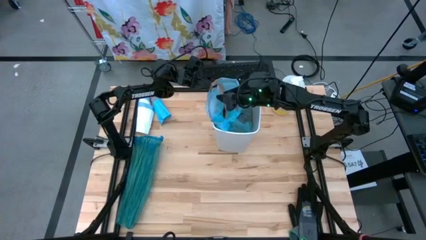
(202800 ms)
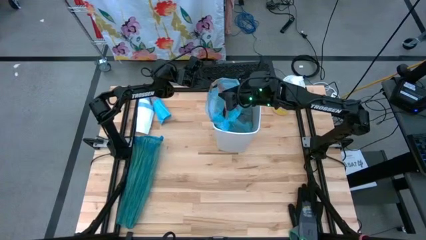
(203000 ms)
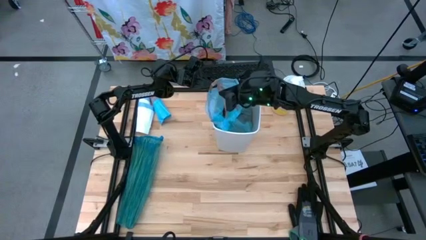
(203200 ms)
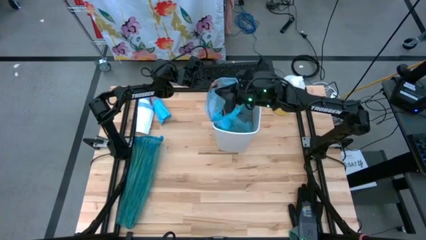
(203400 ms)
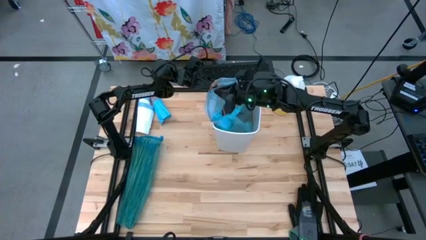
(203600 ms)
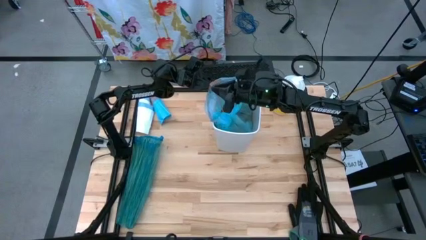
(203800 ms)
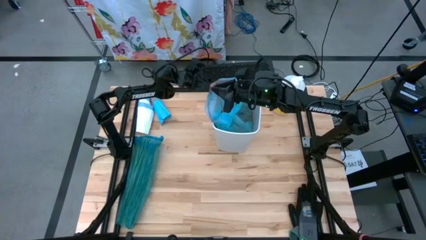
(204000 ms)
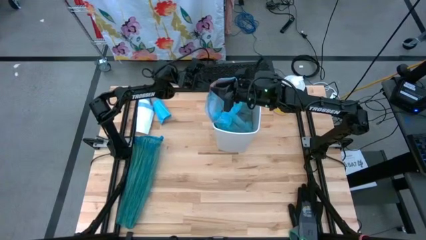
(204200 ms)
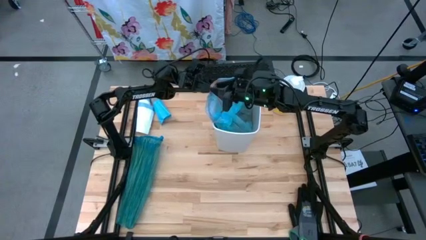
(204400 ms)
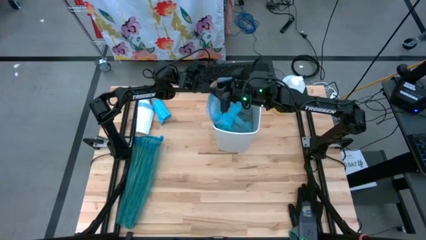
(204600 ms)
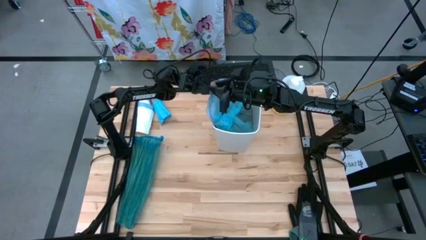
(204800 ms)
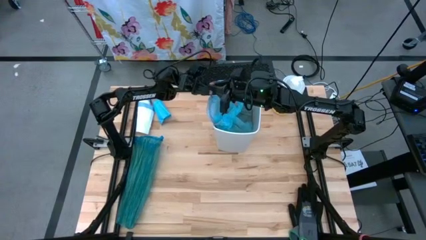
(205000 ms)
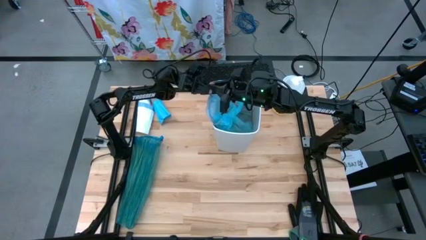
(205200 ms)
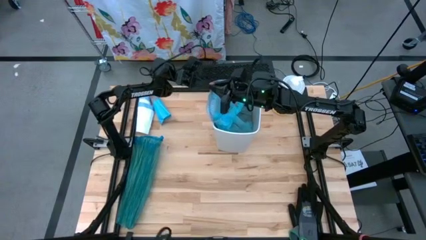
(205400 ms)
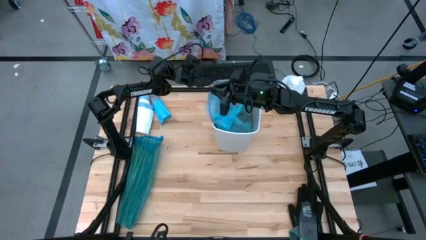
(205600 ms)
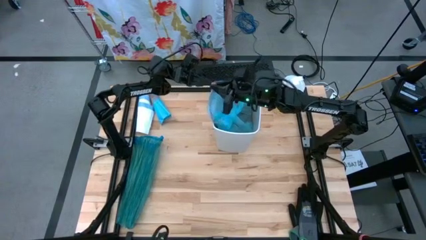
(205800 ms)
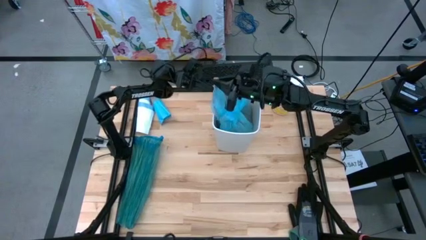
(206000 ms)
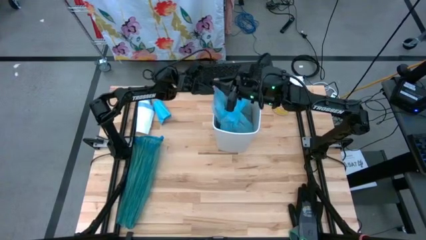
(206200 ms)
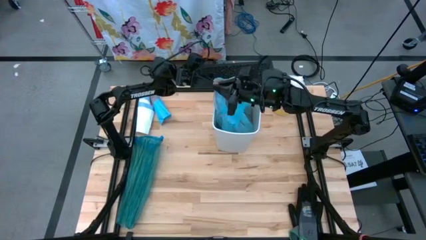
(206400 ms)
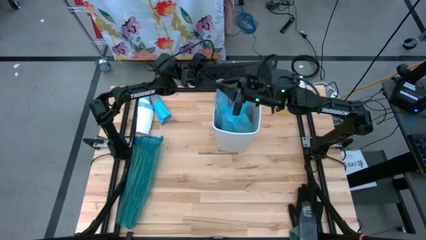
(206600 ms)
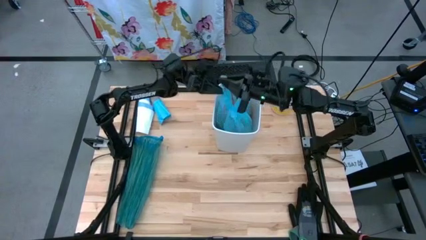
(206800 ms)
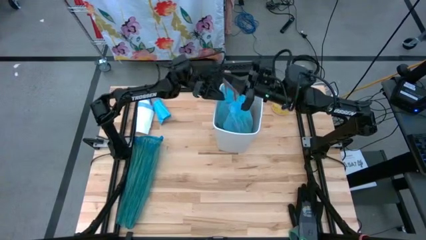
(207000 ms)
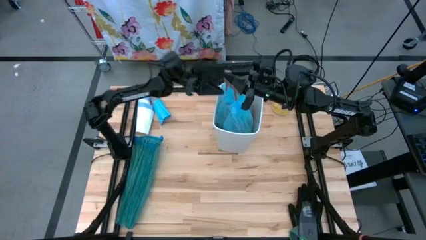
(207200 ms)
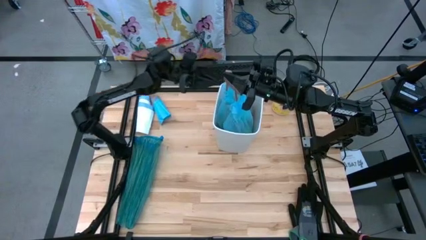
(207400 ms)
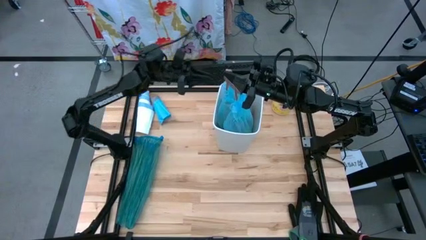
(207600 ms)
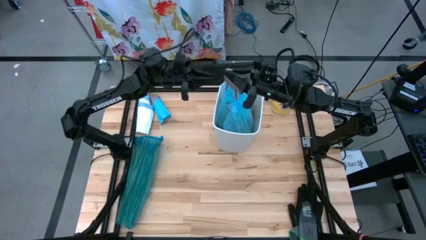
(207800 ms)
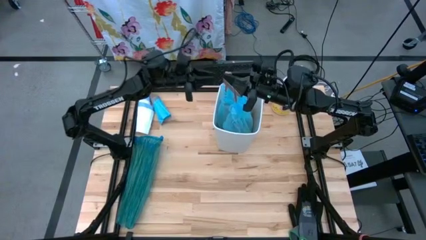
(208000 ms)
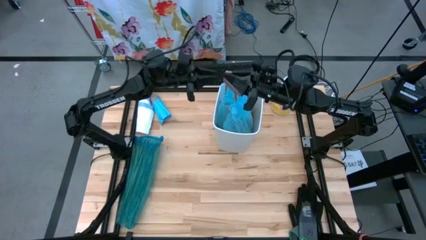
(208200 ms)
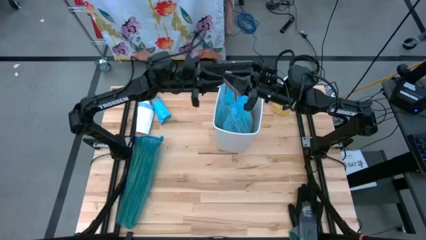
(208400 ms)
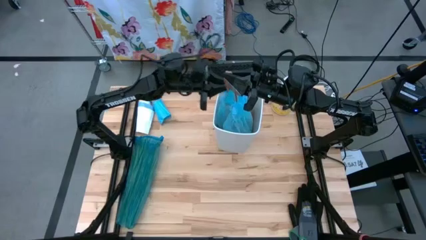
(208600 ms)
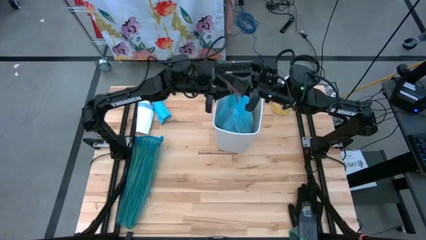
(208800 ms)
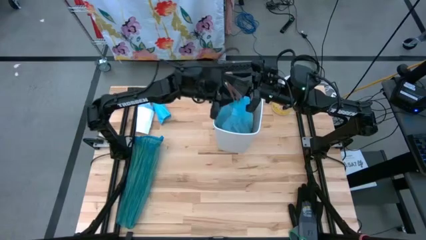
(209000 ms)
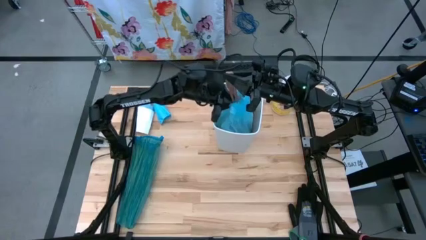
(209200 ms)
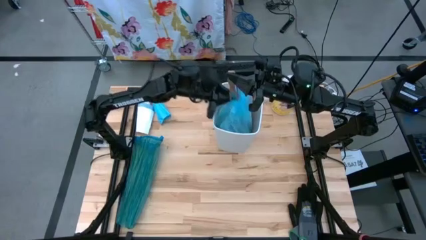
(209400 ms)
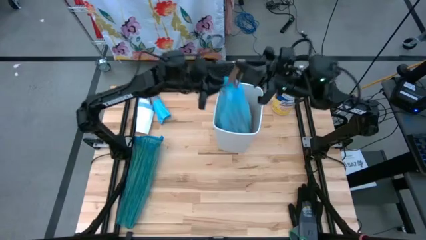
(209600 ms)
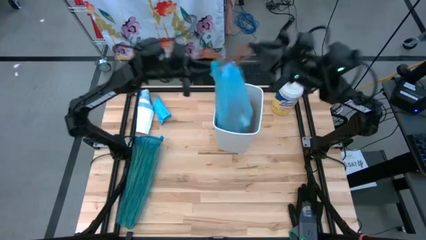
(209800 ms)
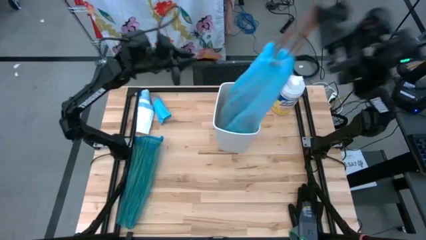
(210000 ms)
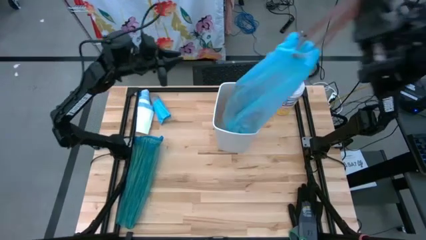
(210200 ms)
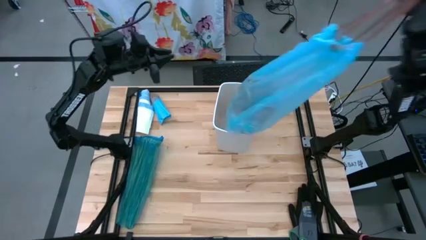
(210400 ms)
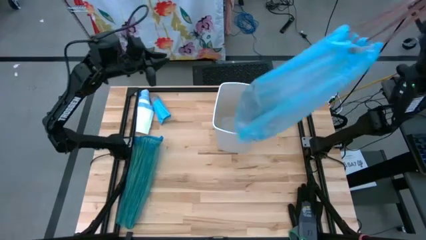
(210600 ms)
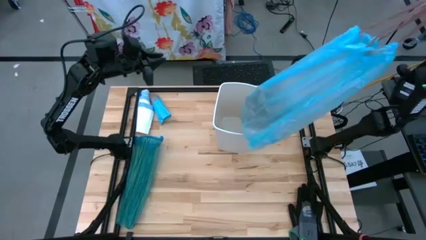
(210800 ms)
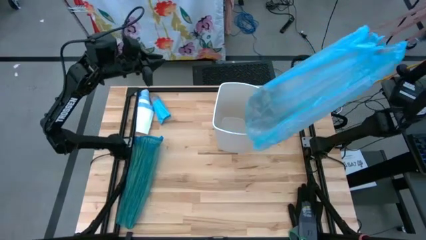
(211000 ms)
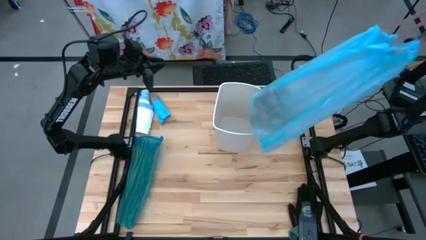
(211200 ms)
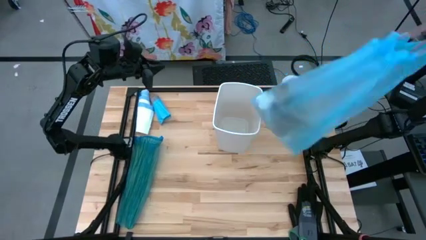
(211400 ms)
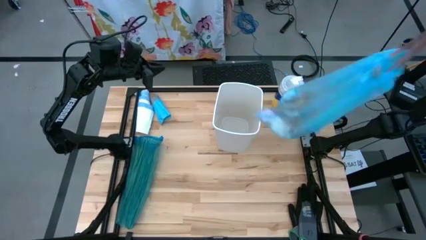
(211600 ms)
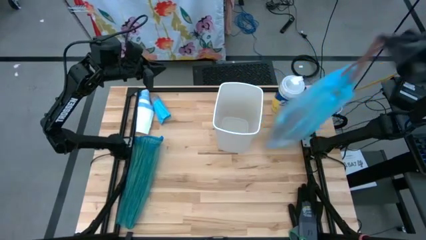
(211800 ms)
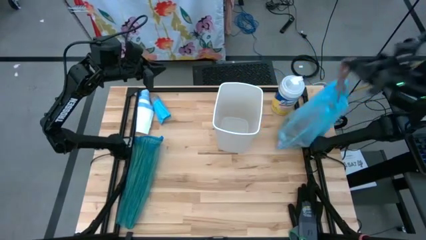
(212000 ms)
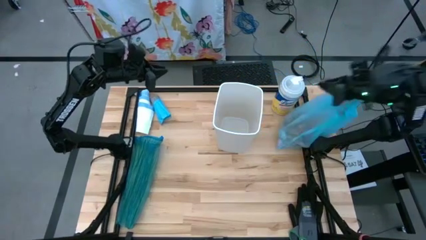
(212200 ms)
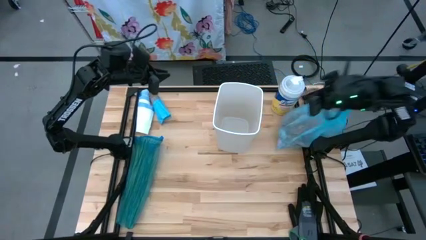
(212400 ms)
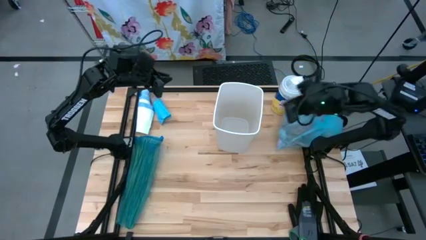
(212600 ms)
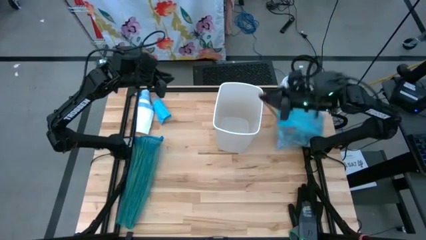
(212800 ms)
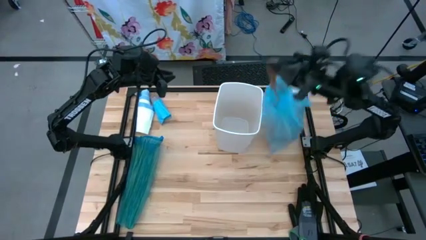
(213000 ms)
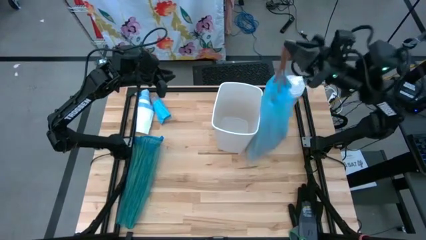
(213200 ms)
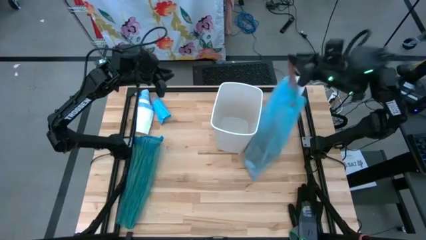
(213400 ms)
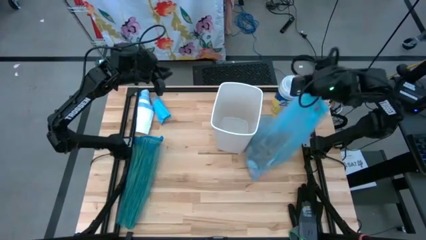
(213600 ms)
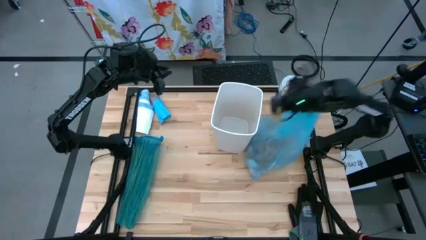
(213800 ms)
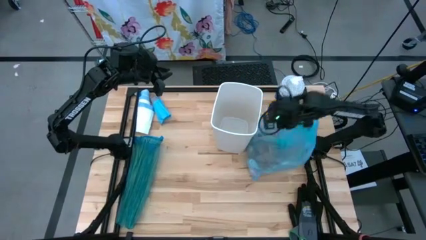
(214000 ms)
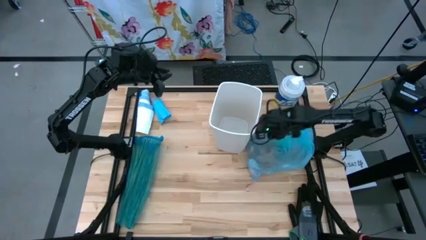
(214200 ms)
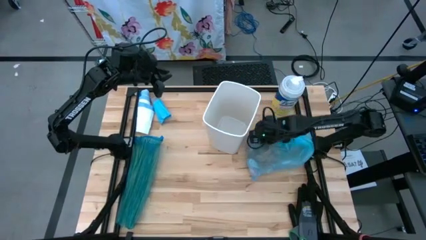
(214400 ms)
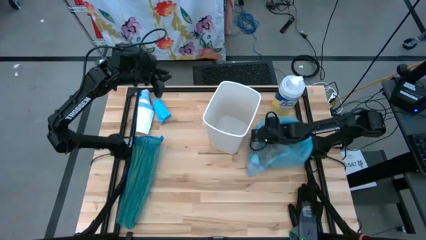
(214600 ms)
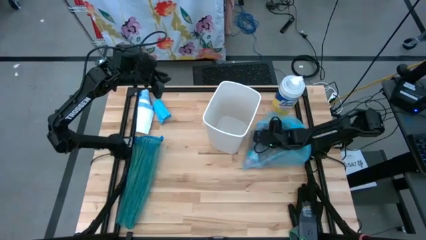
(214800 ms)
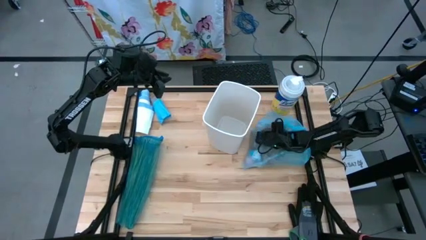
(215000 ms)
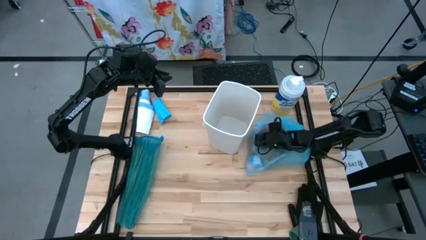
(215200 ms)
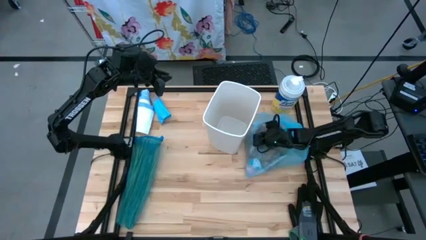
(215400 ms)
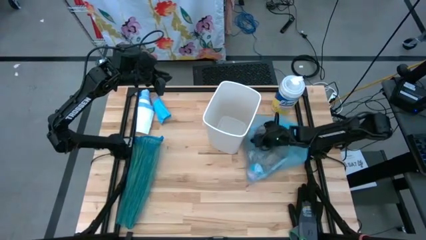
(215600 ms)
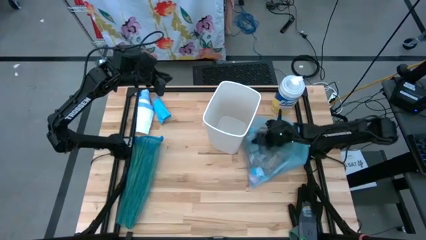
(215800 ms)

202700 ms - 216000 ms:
Task: place trash/remove bag and relplace
Remove the light blue trash bag from the white trash bin

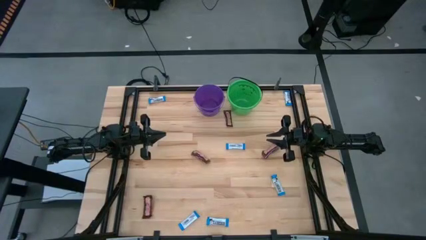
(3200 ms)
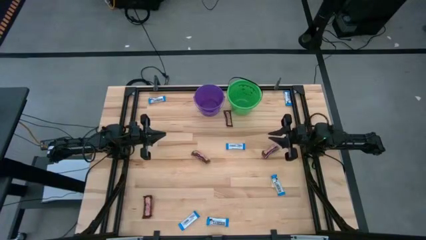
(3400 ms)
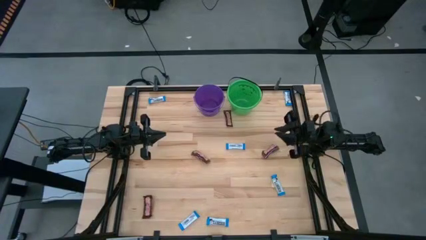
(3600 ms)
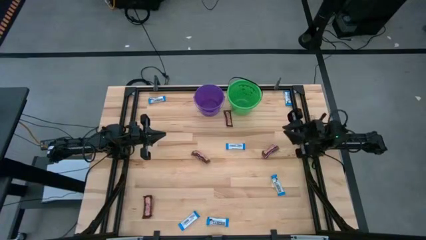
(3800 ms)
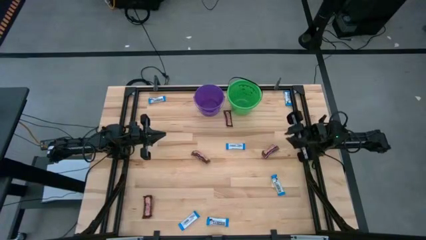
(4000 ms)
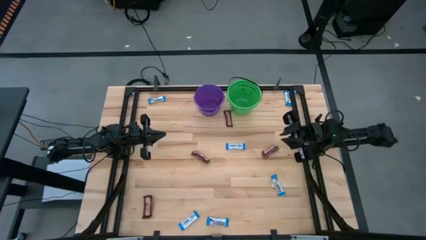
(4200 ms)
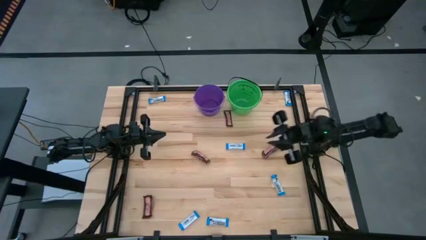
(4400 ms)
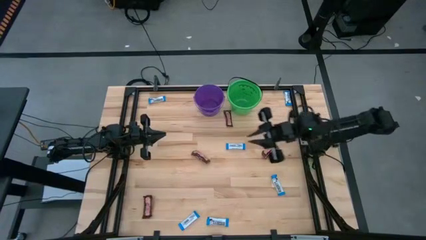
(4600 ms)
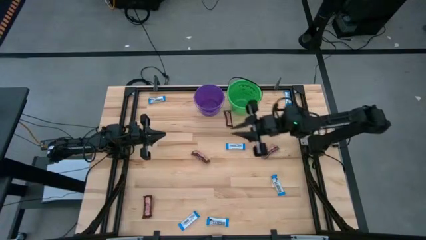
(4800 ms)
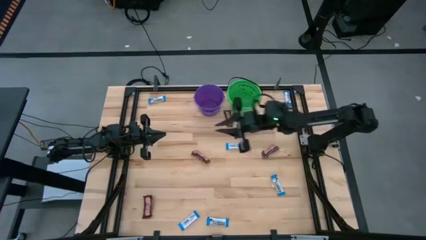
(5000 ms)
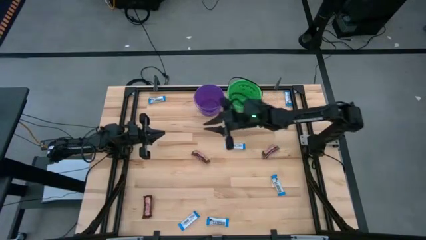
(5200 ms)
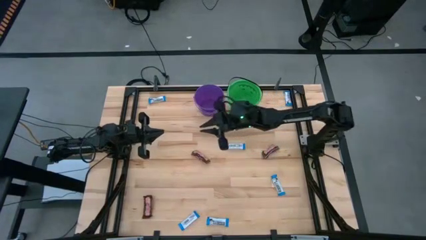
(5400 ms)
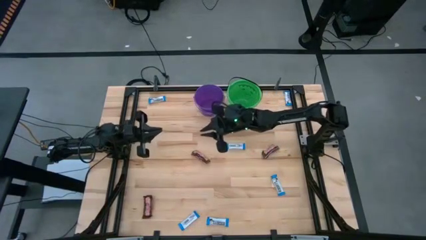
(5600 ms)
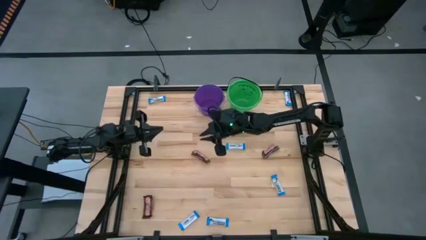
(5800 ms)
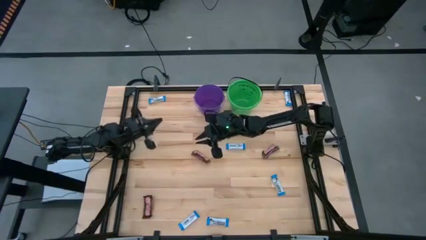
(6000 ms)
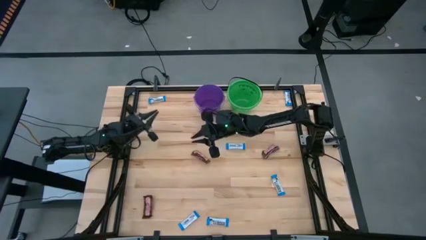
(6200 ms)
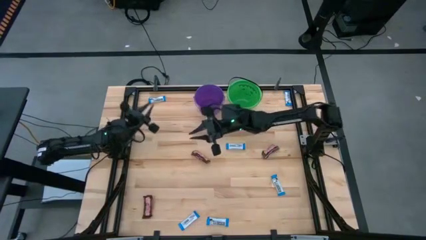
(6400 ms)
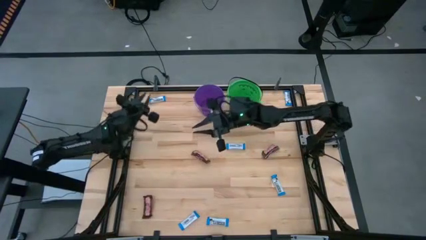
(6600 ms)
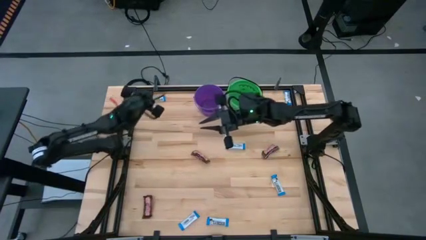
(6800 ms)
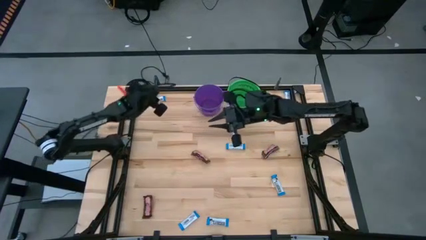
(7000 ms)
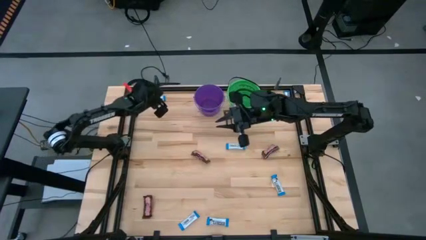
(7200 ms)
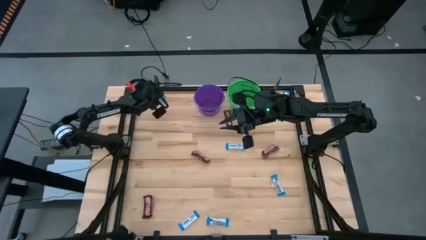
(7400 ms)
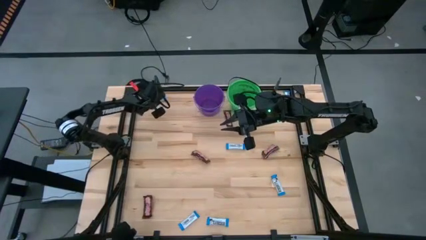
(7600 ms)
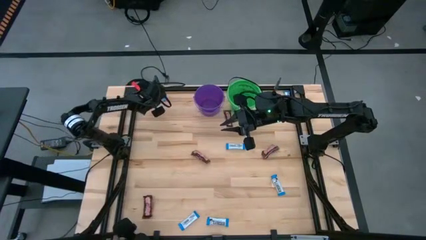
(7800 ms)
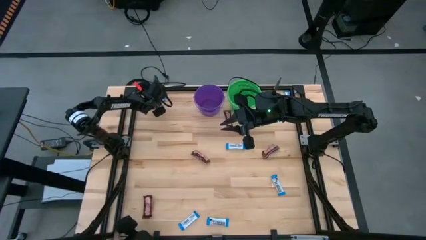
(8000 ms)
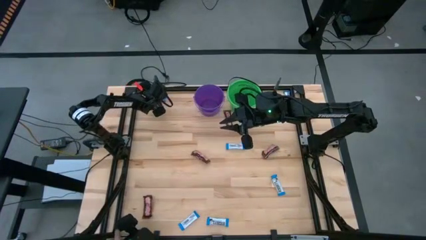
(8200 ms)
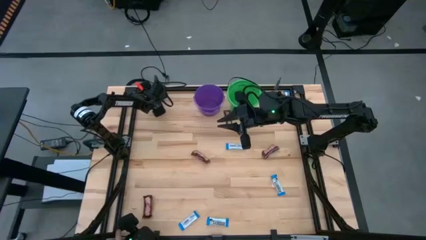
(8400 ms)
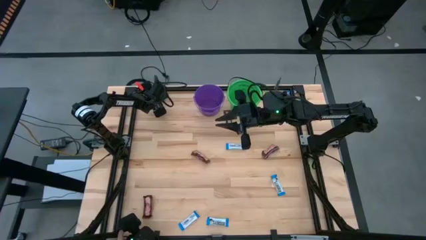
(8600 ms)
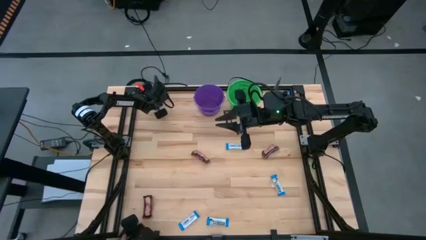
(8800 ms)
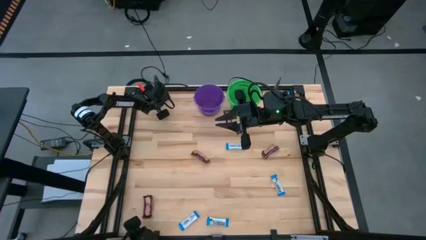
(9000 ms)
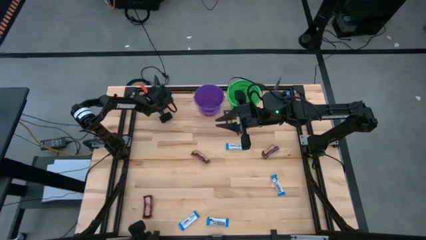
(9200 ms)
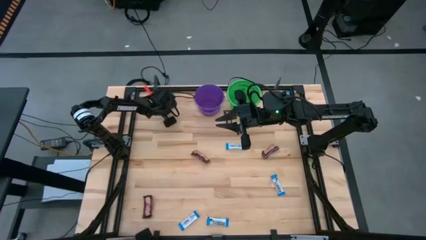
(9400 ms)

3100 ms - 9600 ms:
Task: Sort candy by brand, put in halloween buckets
Put the white chocolate bar into the purple bucket
